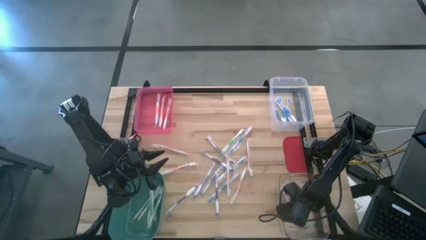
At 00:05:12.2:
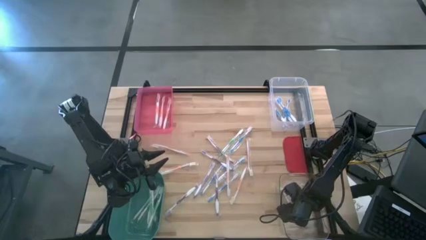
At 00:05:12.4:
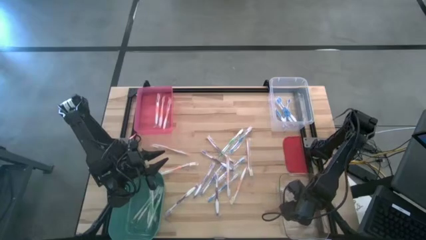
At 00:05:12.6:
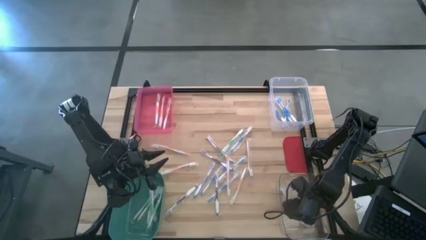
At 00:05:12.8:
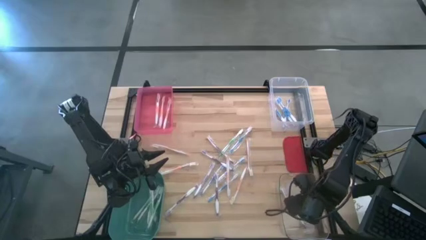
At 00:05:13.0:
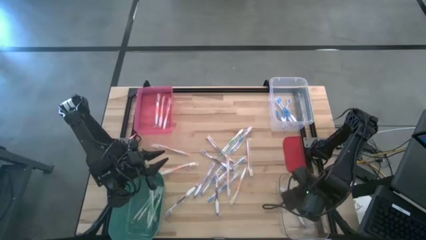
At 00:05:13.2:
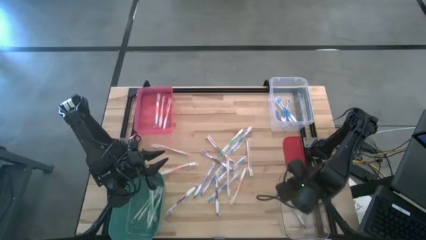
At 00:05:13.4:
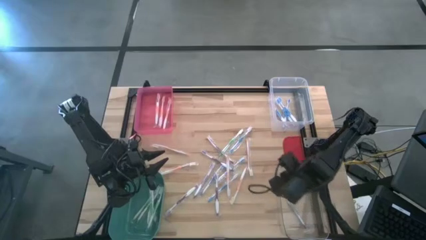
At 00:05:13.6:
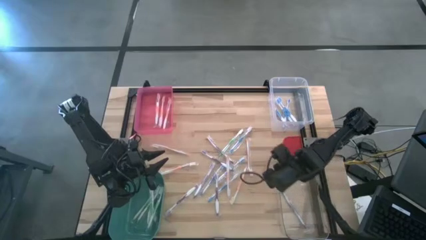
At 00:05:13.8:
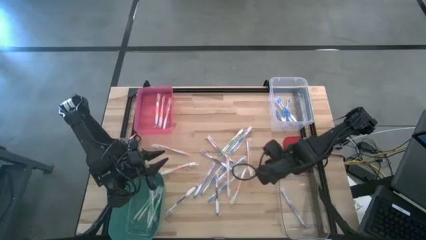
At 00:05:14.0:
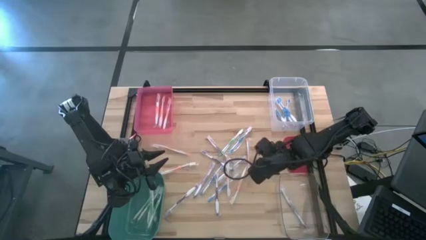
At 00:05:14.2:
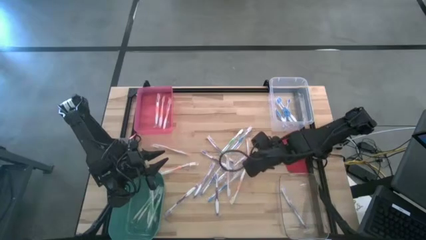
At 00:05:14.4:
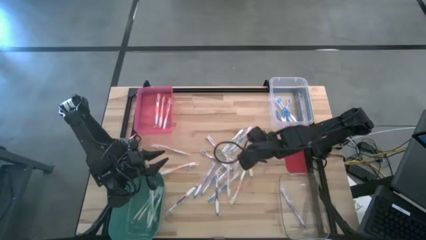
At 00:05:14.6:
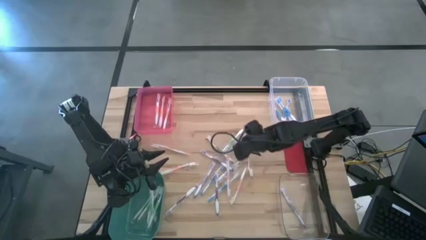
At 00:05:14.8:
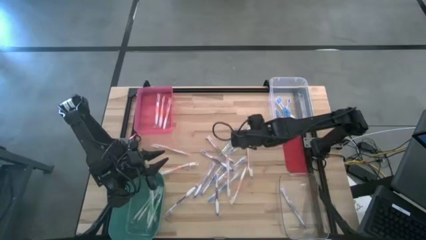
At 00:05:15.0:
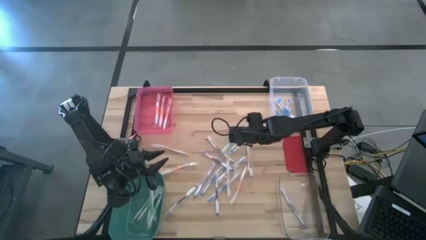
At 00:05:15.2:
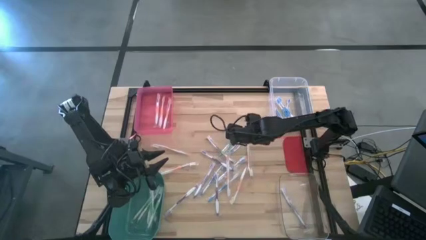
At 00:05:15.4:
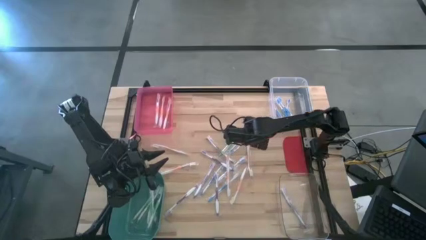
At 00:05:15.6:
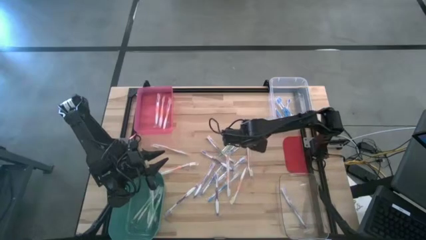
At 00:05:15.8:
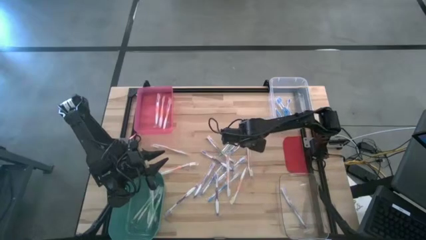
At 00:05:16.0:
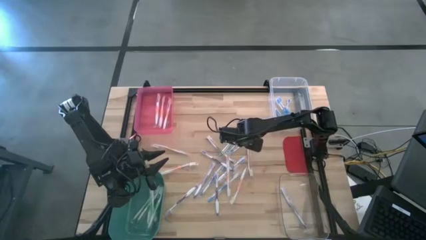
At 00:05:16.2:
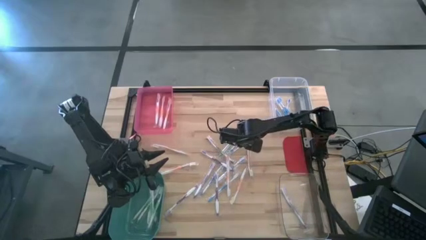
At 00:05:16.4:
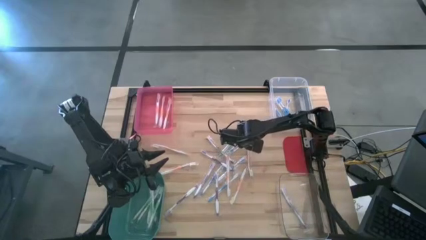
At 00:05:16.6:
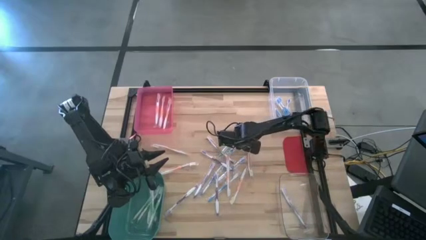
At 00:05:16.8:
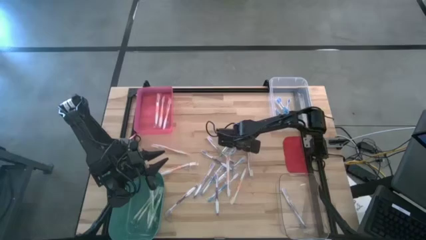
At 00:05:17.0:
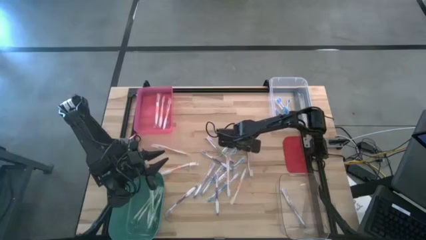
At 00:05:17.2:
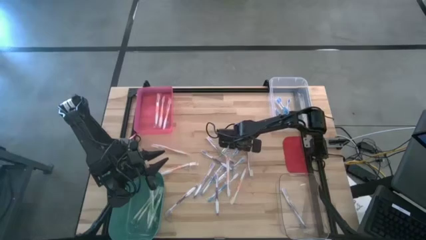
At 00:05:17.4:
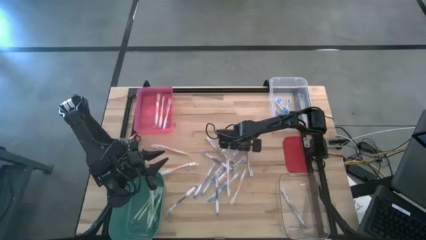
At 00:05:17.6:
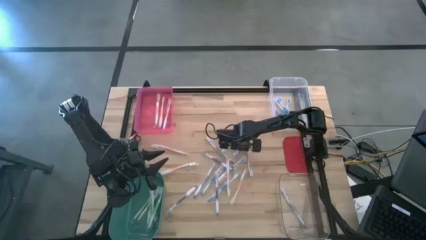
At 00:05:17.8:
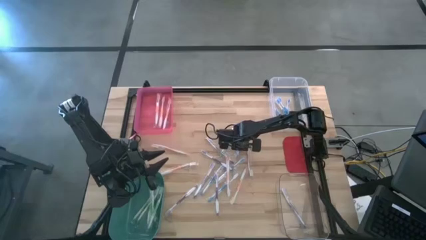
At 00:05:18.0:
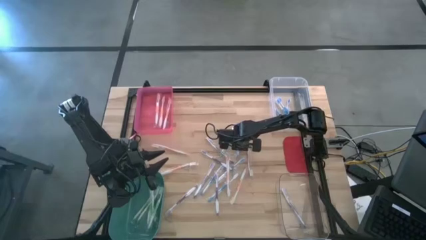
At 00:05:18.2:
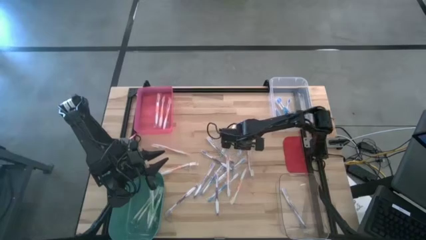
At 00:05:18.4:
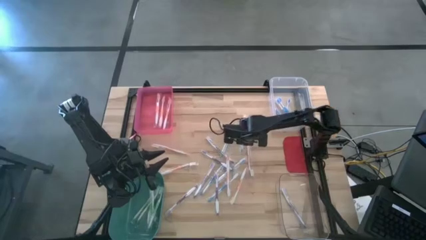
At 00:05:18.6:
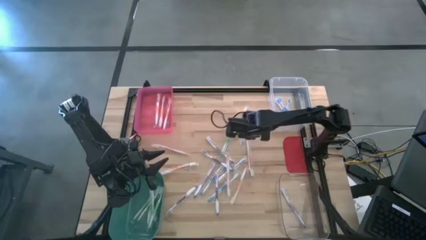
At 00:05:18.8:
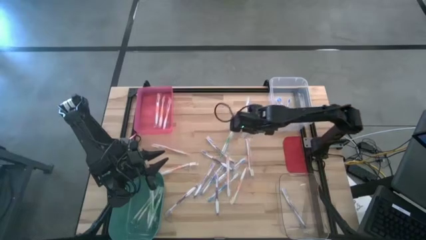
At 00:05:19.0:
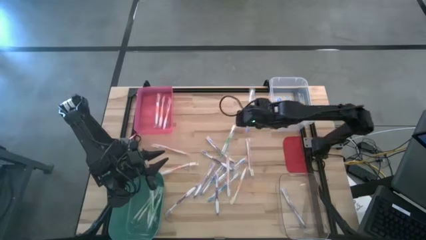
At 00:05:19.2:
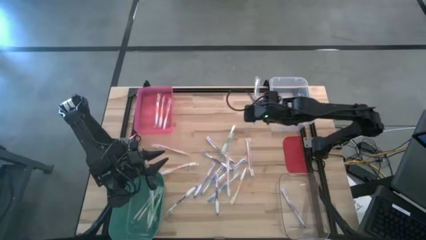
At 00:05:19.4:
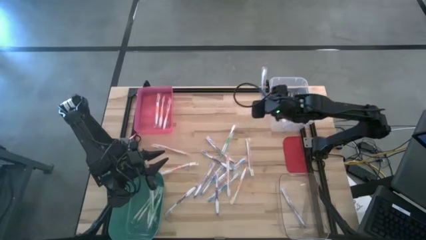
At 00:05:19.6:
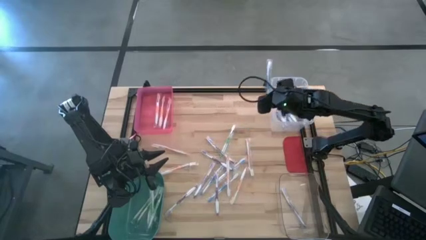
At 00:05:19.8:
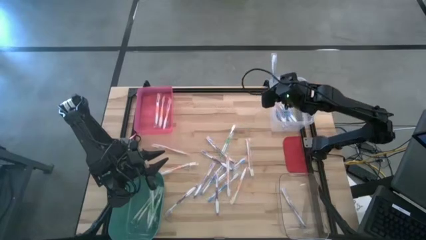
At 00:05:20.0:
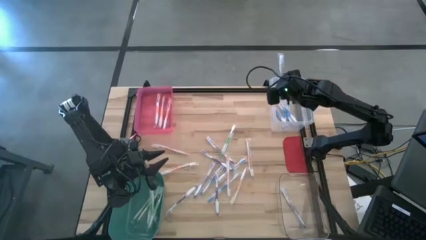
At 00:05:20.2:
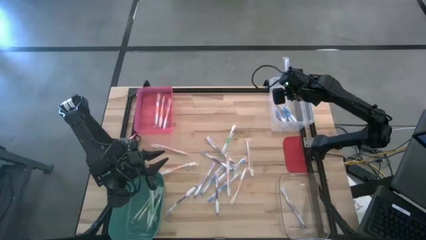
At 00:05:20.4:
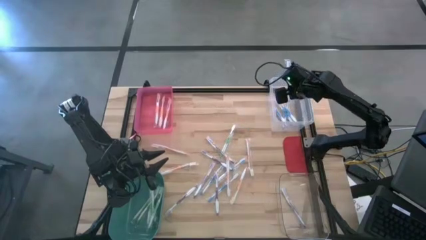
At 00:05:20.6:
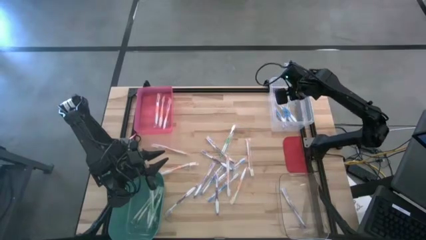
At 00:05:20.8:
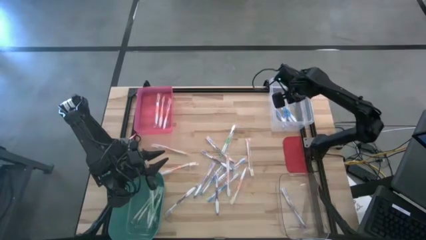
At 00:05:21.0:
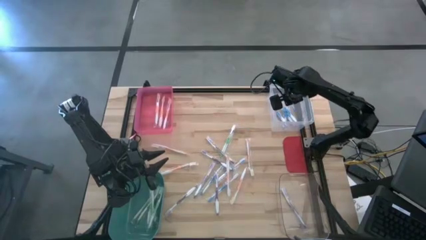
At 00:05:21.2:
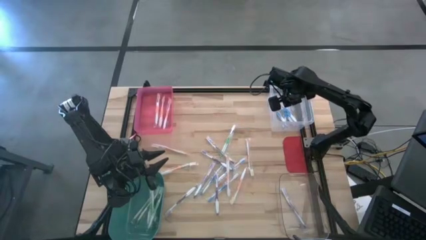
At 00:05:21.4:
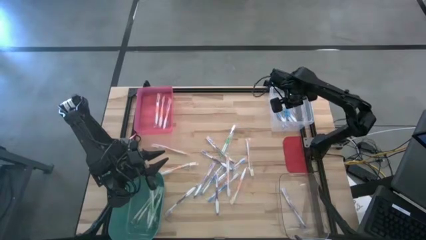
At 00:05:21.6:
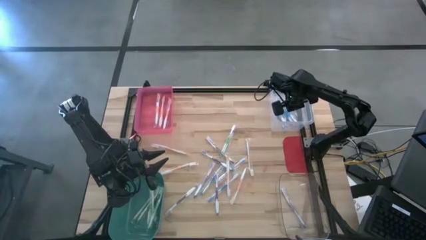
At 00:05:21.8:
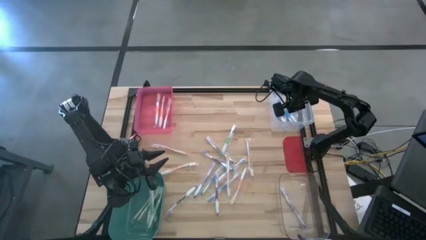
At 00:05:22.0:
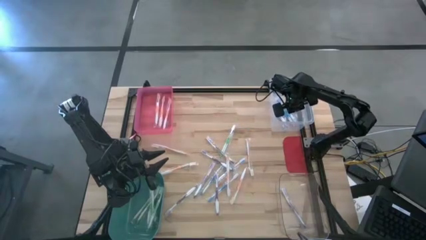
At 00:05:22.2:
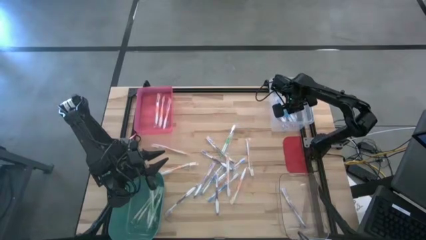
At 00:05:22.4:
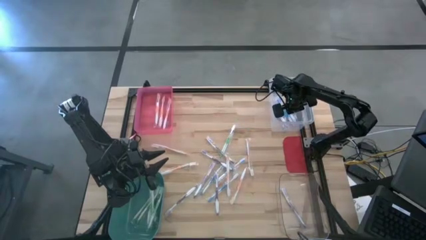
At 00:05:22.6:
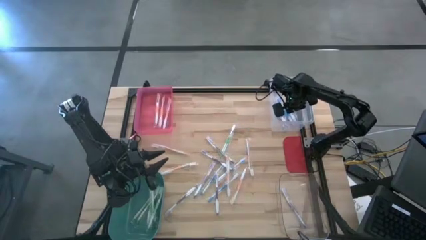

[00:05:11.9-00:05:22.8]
Task: Pick & Place Toothbrushes
Put the blue toothbrush into the top transparent bin

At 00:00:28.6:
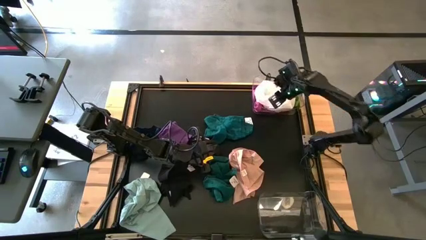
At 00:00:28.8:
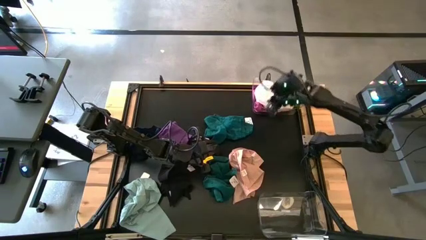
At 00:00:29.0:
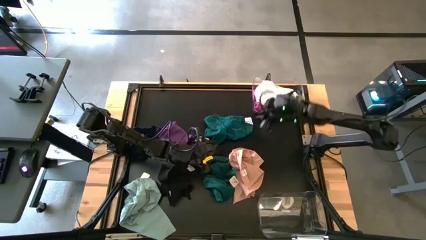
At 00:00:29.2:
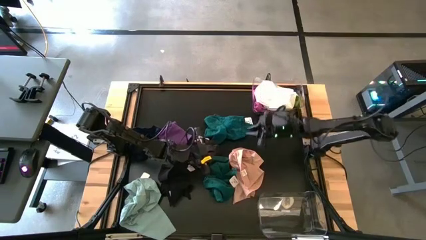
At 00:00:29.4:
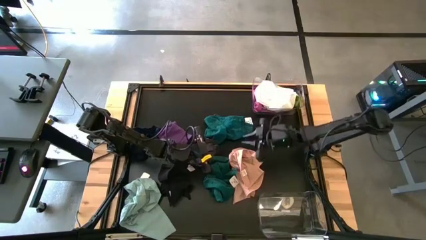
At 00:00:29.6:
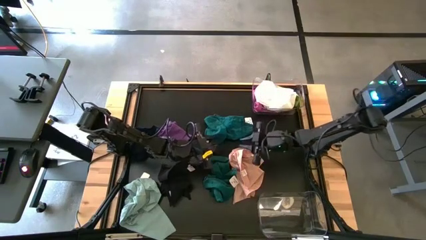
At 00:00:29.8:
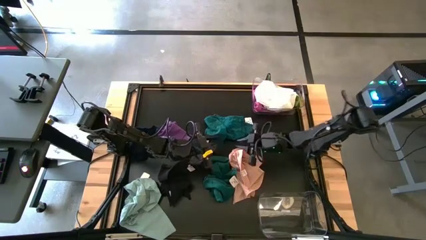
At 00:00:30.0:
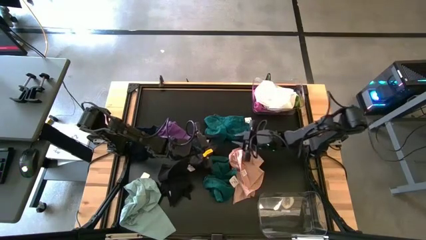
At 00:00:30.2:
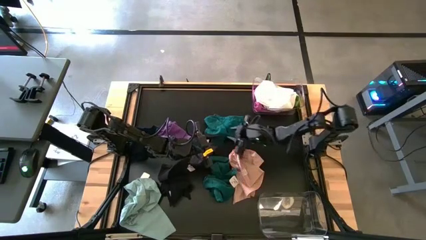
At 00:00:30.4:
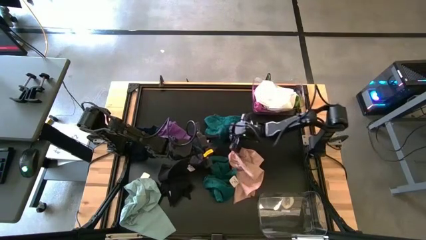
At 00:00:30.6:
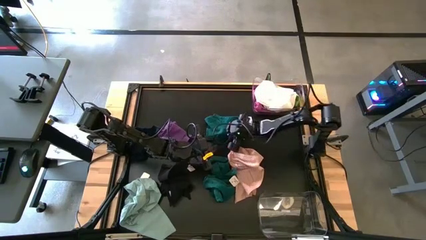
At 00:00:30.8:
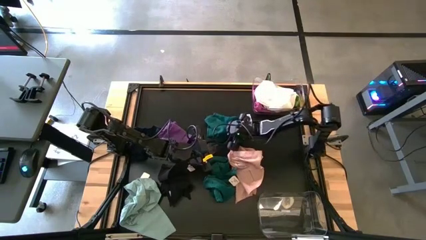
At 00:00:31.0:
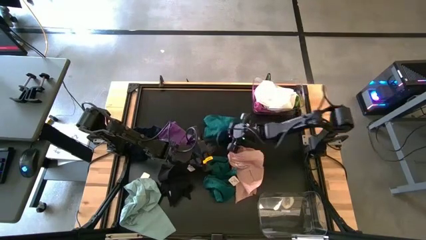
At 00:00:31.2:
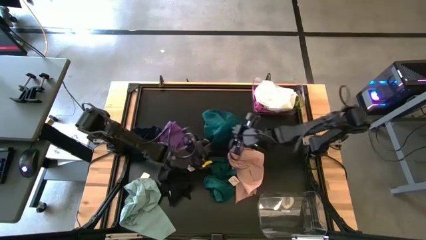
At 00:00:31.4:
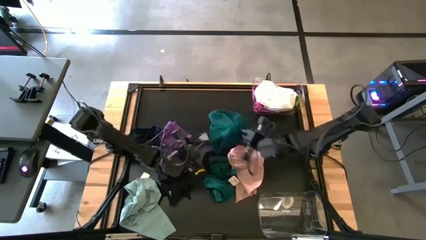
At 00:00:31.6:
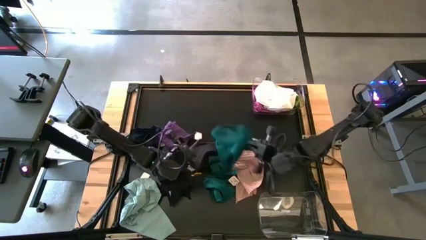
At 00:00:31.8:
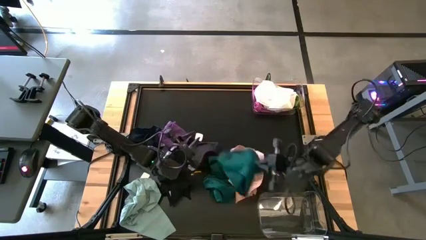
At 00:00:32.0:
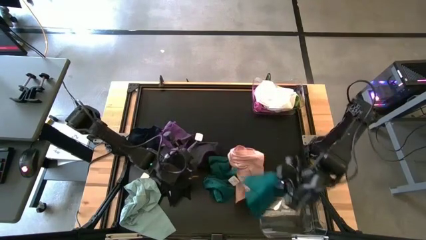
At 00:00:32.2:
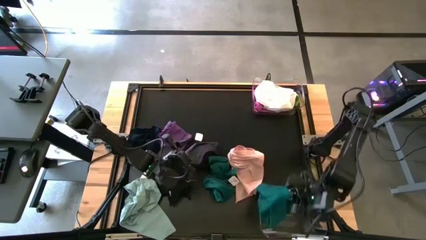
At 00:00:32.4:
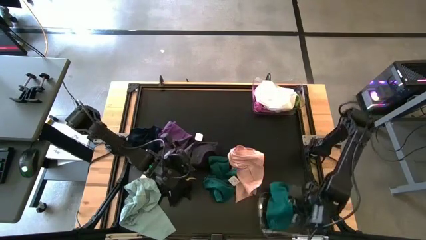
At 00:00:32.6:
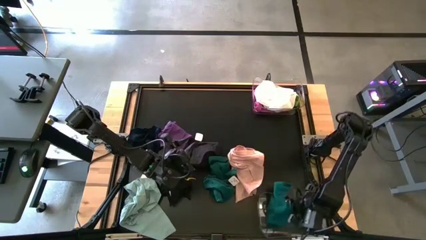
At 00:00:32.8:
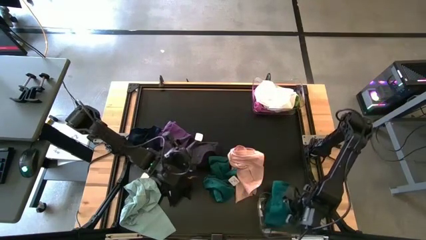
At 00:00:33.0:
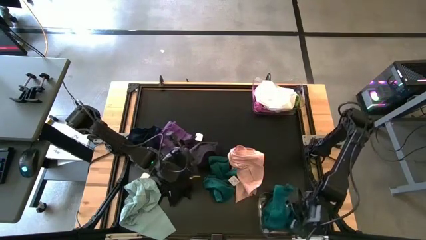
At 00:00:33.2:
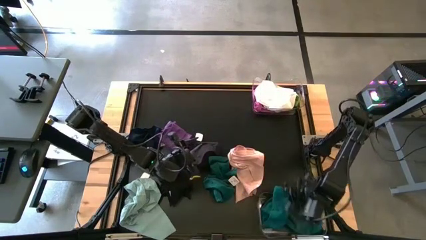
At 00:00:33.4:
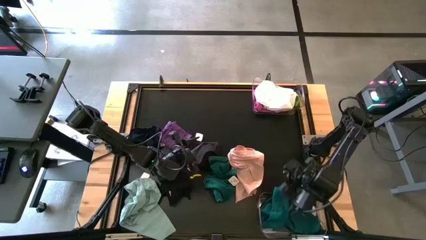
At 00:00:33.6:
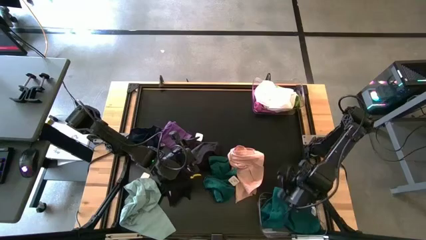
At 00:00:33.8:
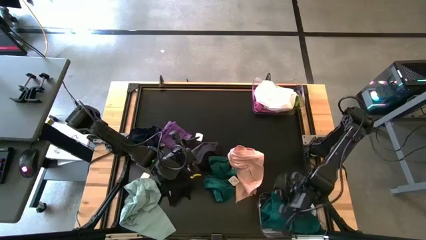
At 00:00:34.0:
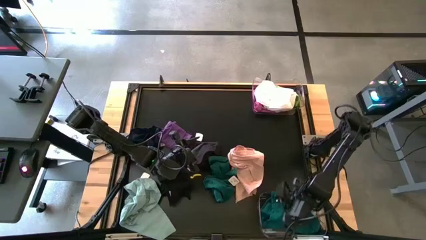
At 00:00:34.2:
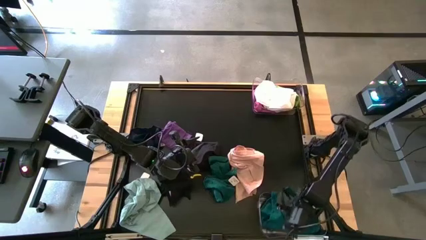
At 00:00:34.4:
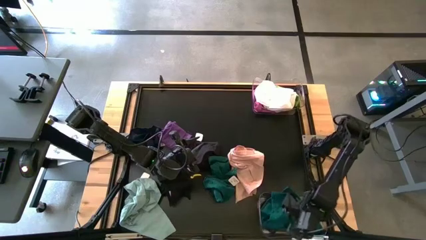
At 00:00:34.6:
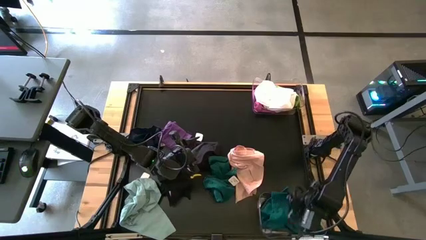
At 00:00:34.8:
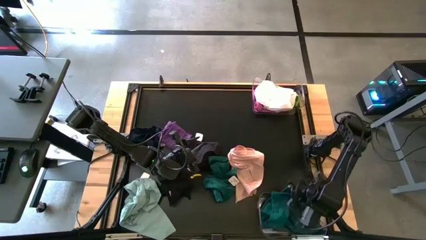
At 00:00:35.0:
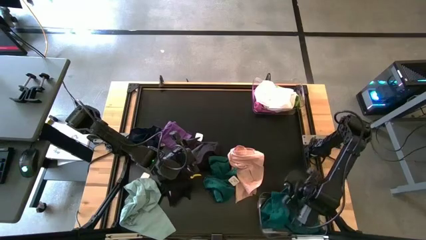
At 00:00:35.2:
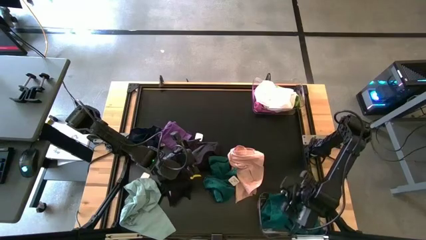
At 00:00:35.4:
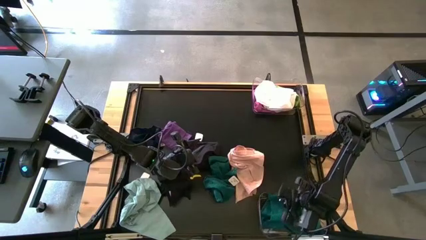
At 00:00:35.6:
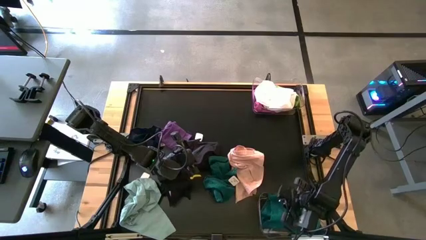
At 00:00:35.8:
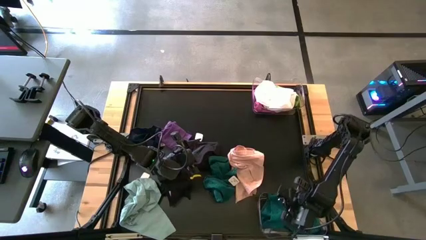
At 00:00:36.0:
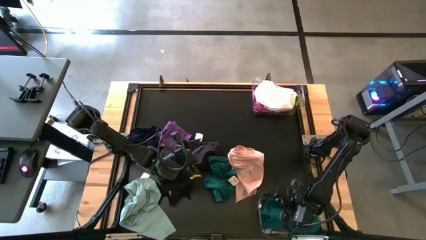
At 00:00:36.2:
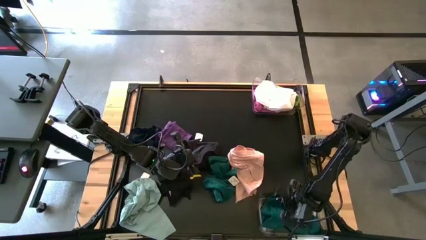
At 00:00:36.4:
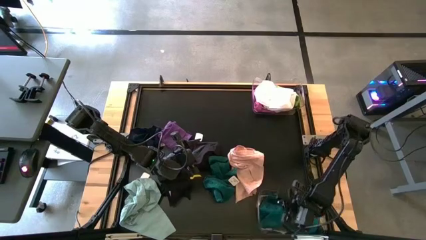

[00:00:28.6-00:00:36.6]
Task: Sort towels by color in basket
Put the top dark green towel into the bottom transparent bin
